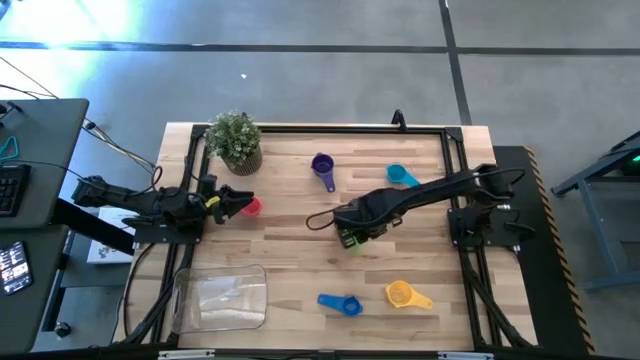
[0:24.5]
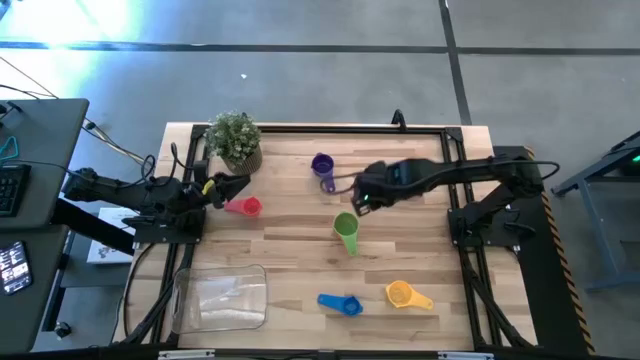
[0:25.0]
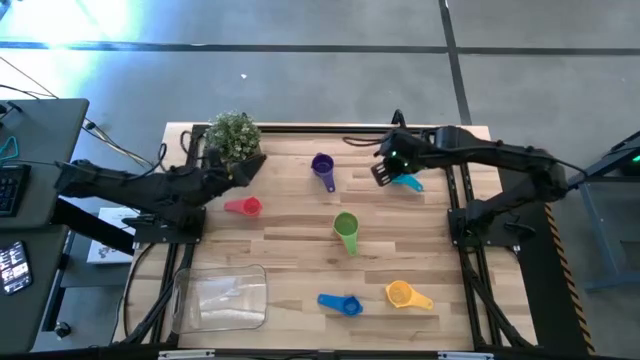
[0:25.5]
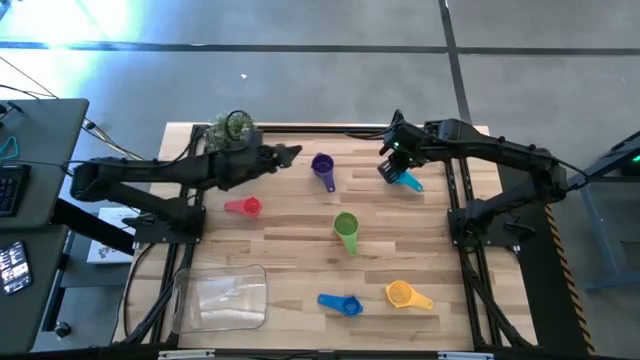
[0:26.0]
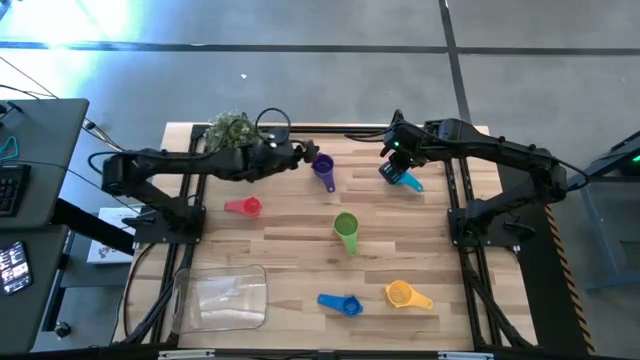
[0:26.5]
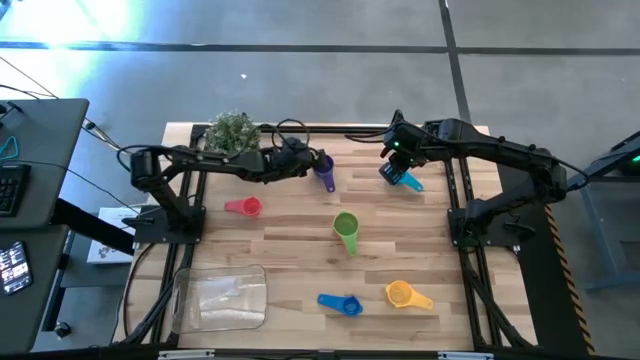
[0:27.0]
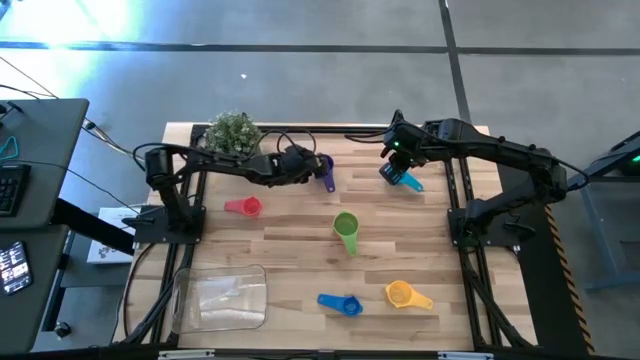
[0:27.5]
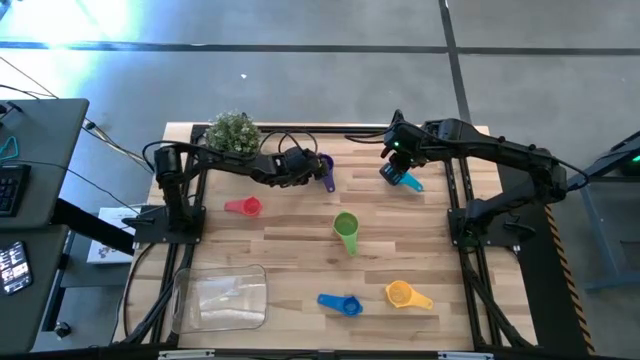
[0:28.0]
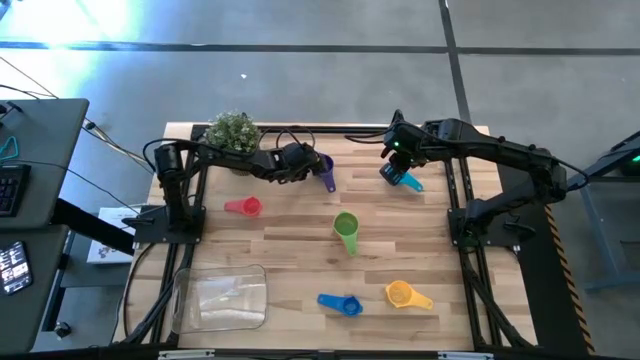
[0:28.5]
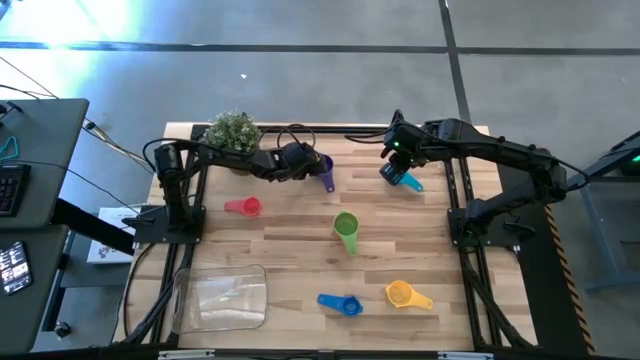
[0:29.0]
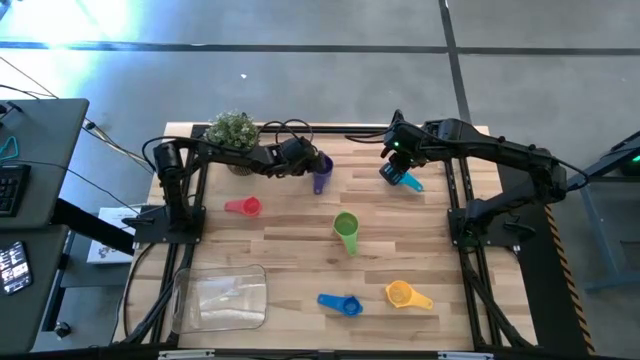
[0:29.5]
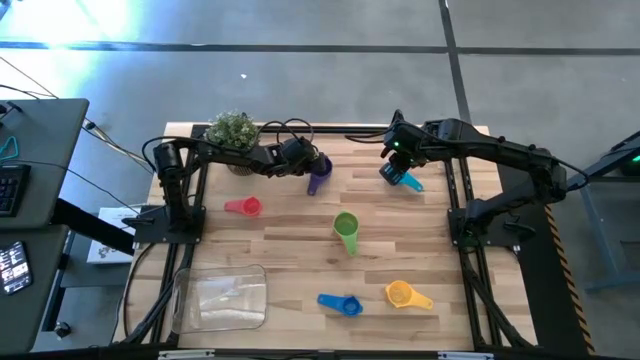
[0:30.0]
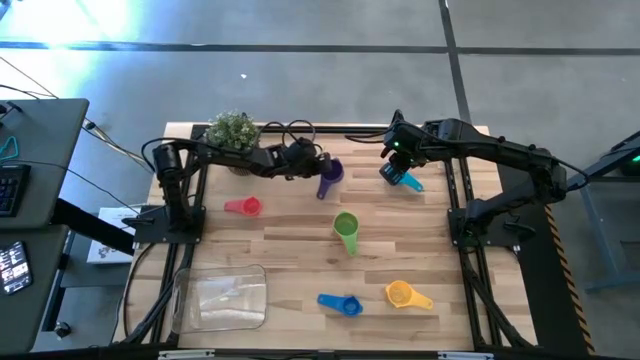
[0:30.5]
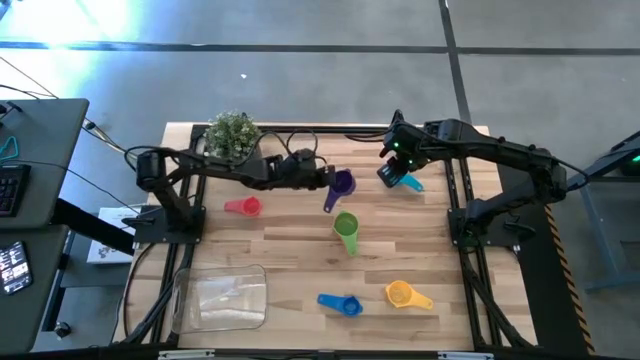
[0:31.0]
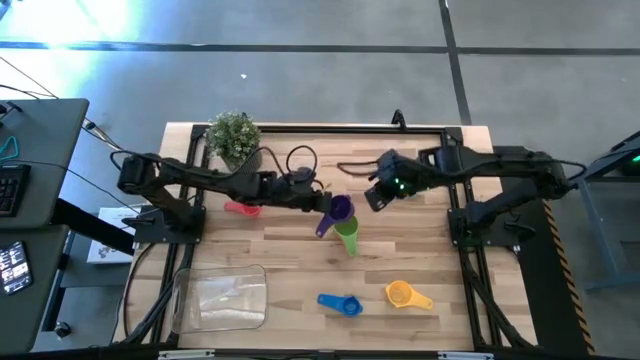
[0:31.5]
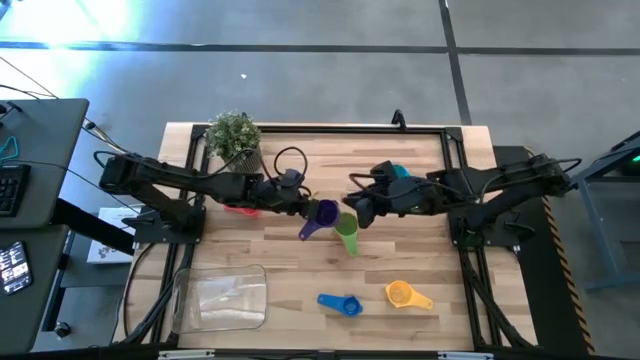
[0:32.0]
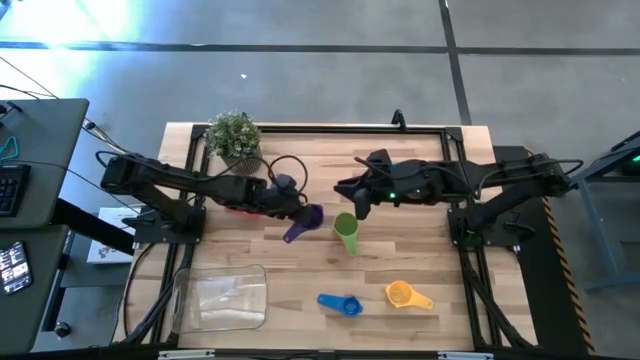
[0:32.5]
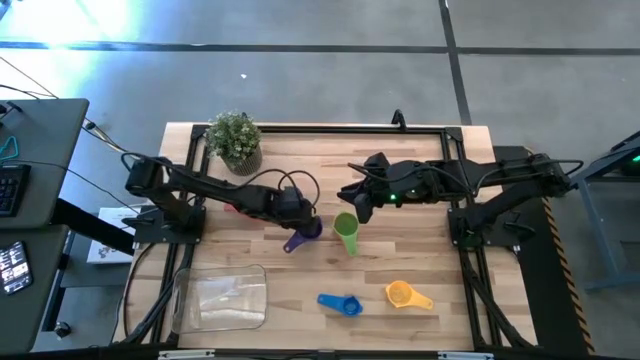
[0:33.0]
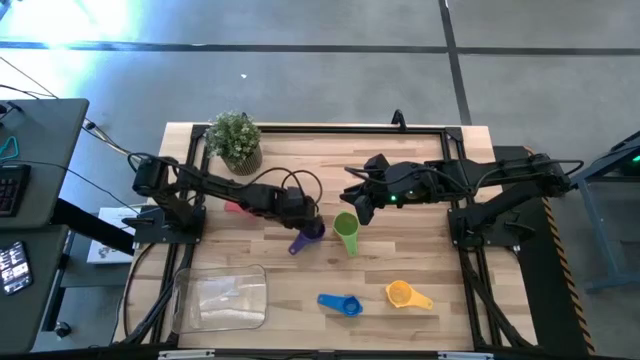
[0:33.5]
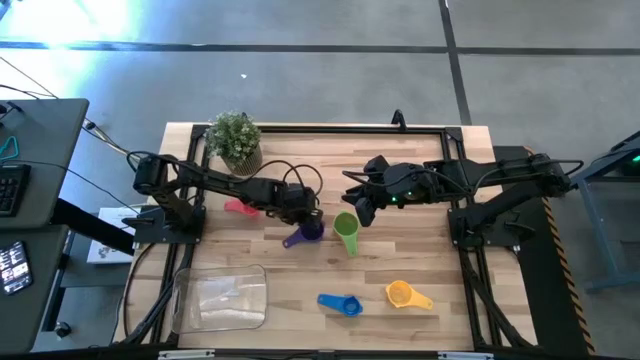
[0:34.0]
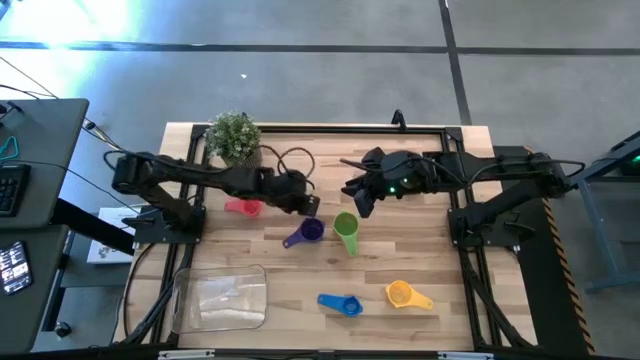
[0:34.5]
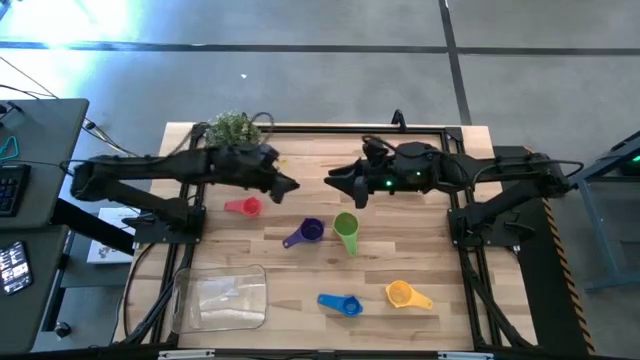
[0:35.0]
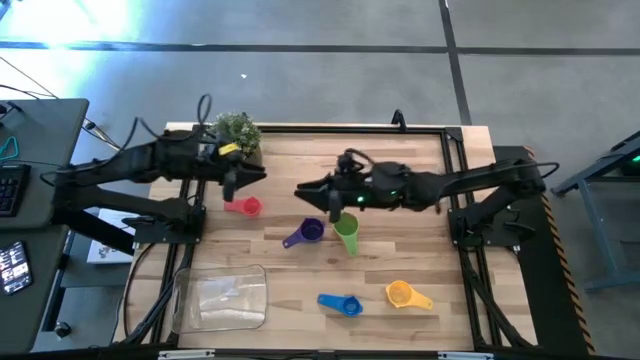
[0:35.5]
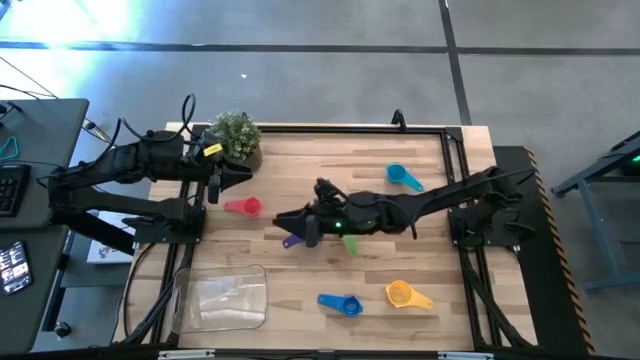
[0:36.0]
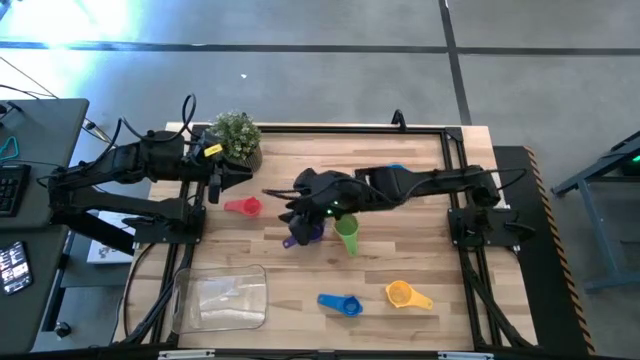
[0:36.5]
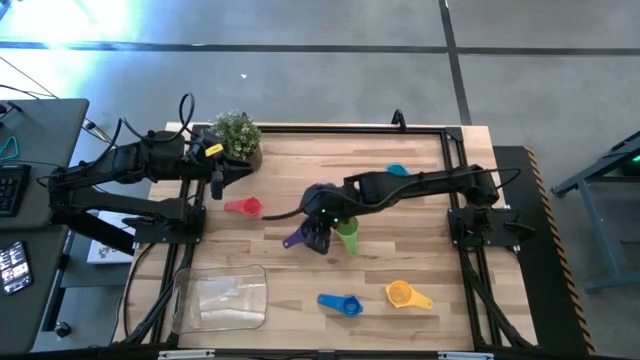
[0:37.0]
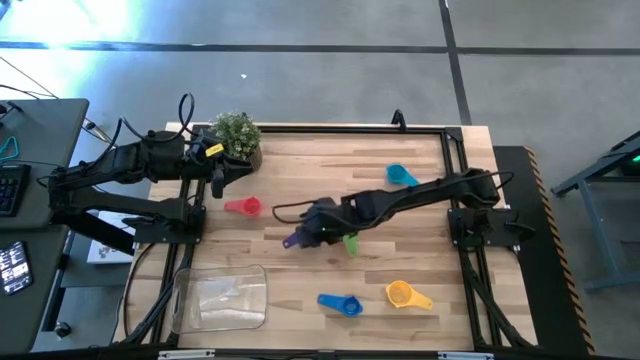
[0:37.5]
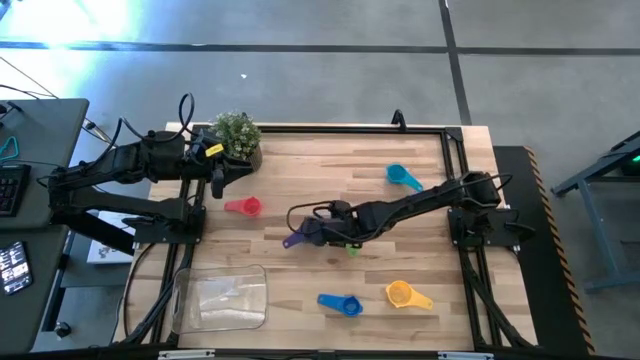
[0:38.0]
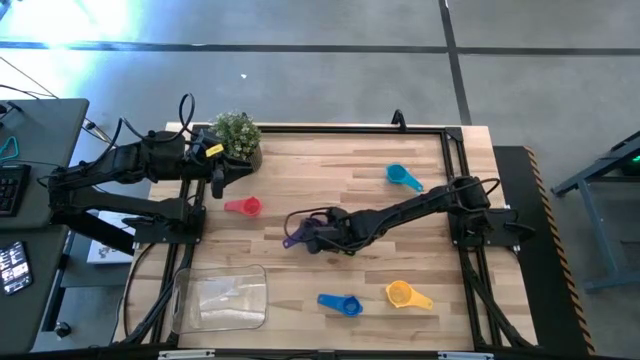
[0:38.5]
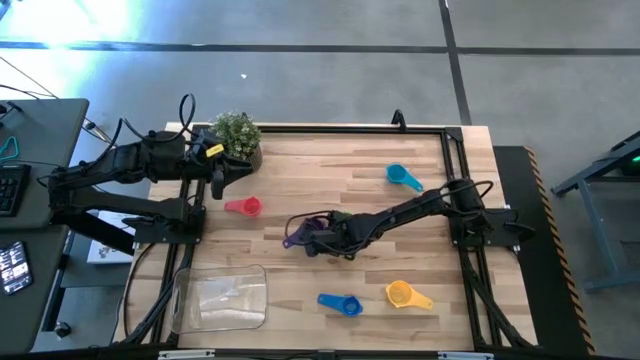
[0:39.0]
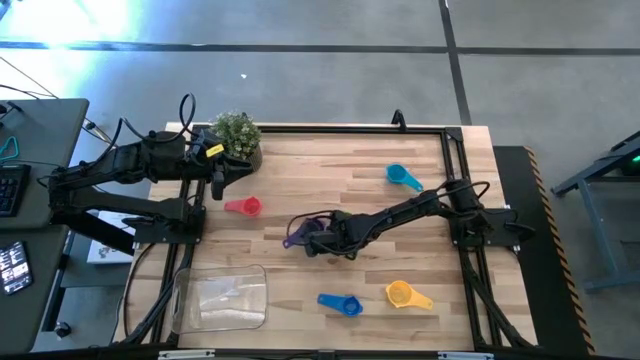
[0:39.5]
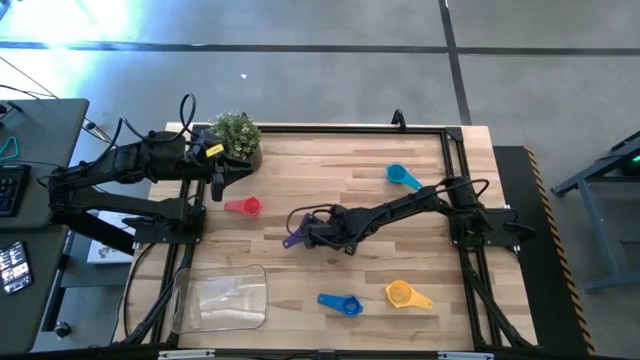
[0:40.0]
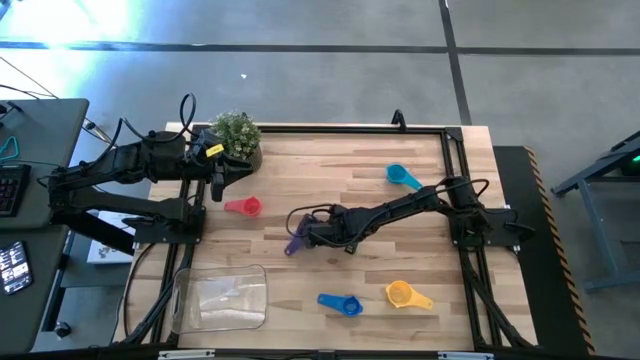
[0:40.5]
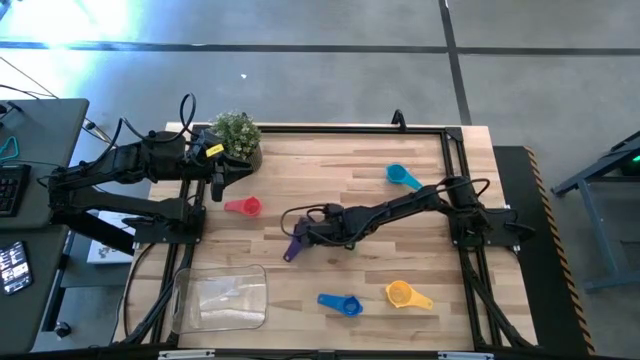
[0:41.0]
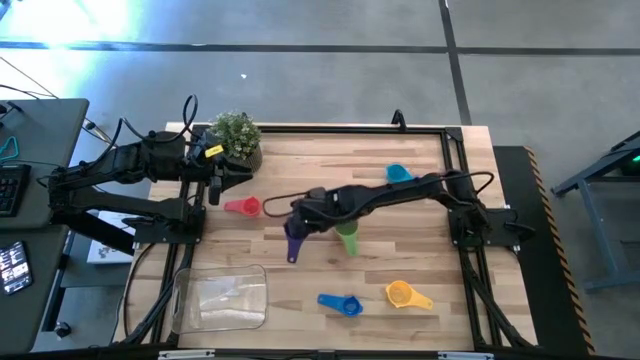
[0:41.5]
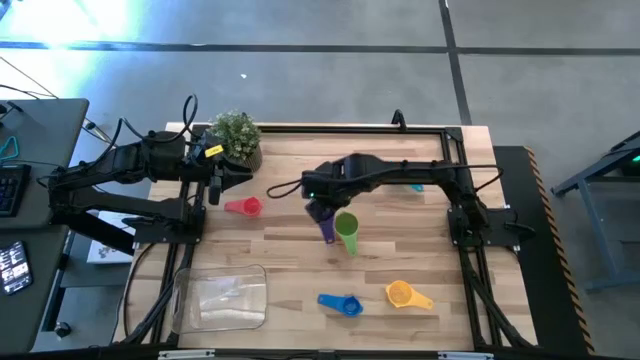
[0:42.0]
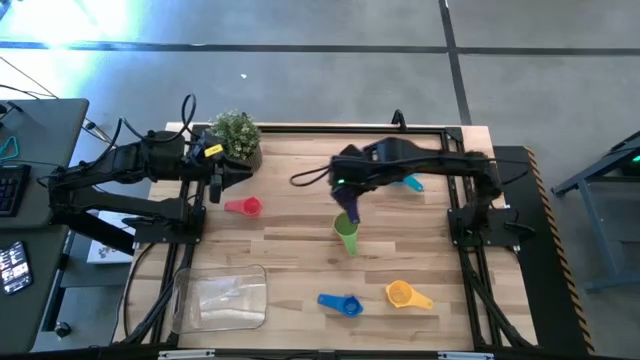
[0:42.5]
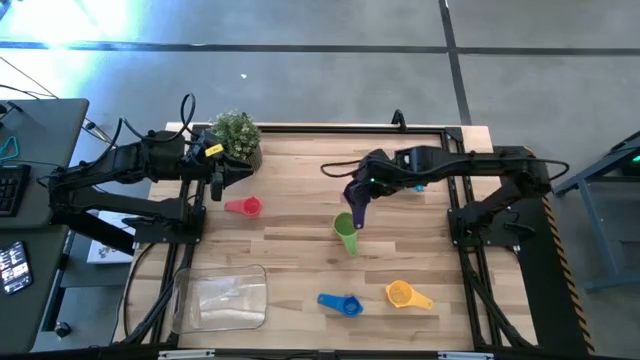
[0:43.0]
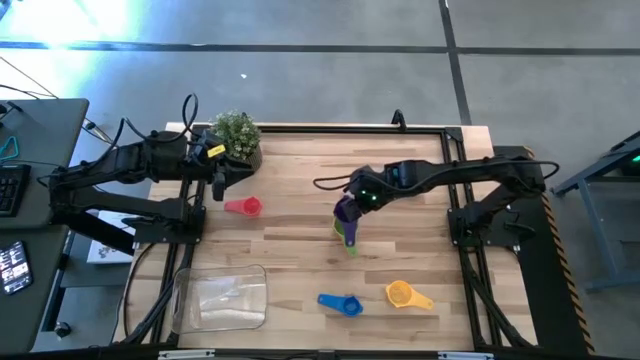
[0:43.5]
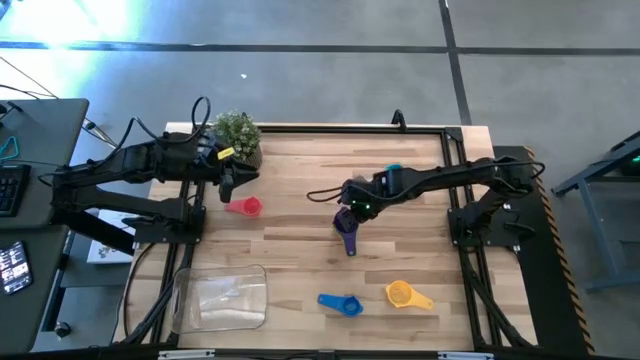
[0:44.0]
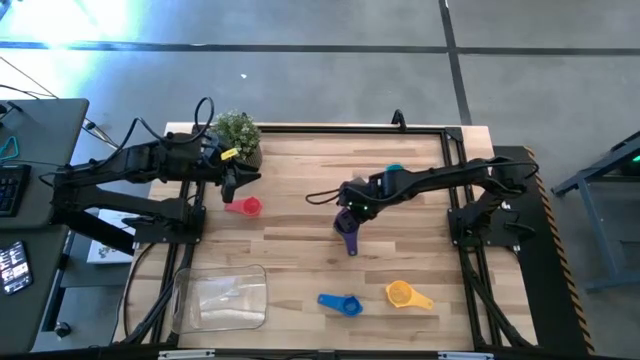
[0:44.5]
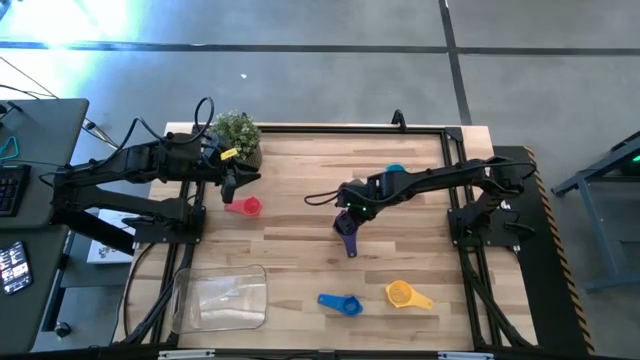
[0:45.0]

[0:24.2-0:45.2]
Task: Nest measuring cups in basket
Stack the violet measuring cup on top of the green measuring cup
